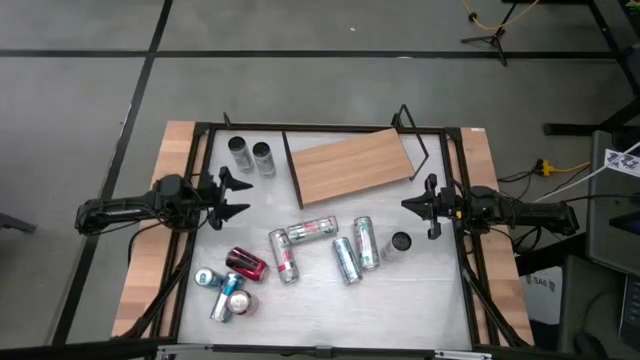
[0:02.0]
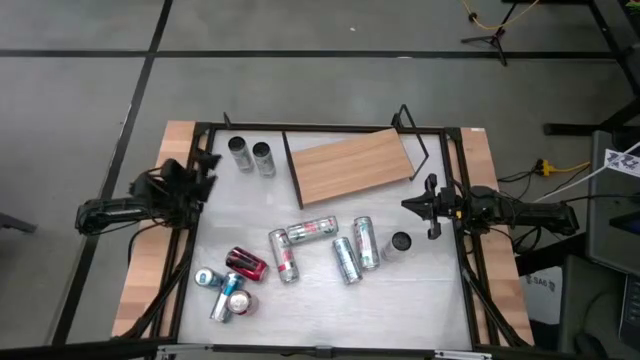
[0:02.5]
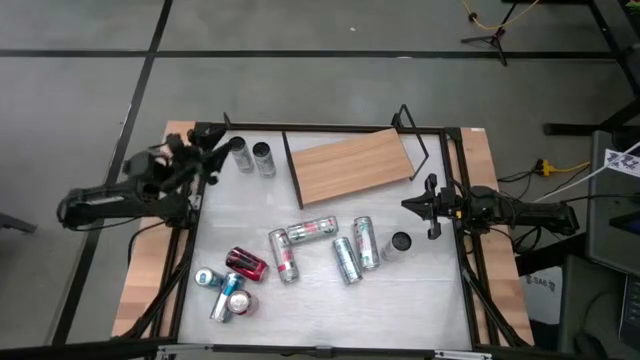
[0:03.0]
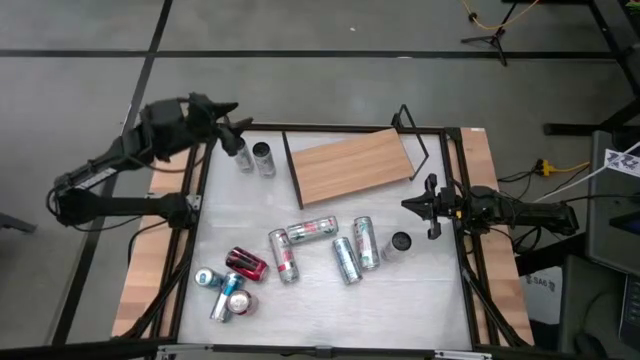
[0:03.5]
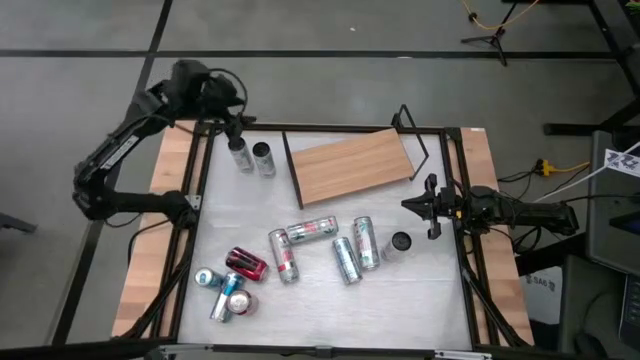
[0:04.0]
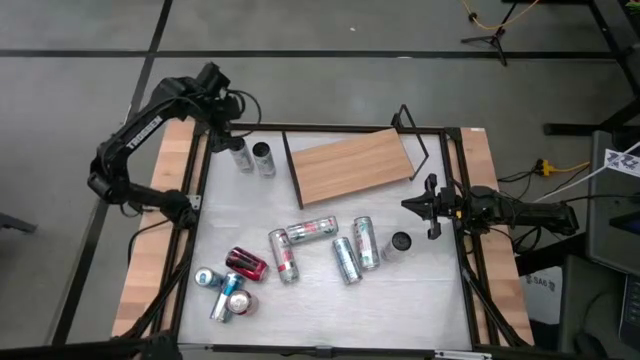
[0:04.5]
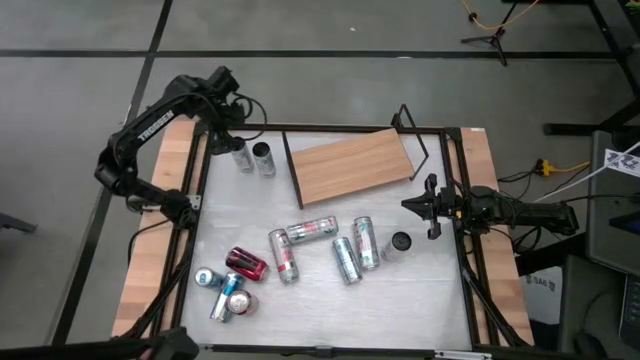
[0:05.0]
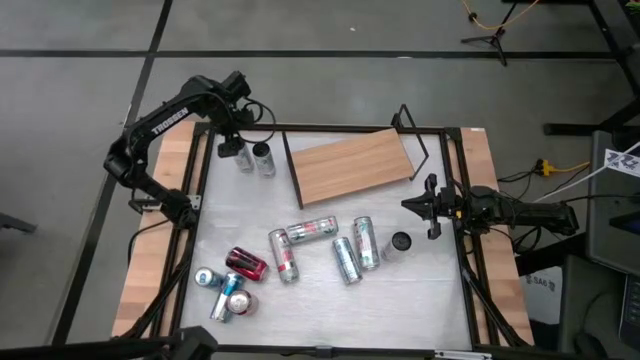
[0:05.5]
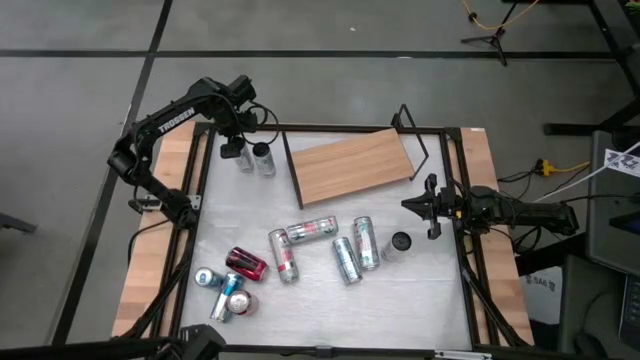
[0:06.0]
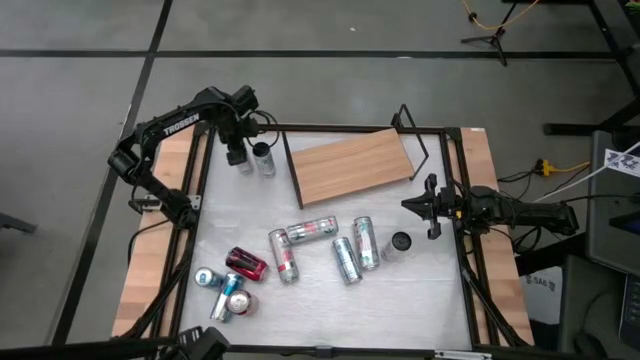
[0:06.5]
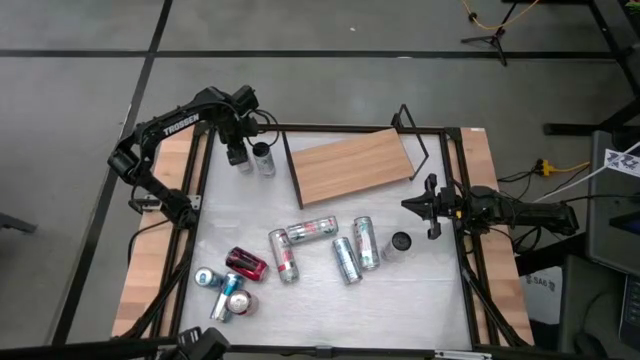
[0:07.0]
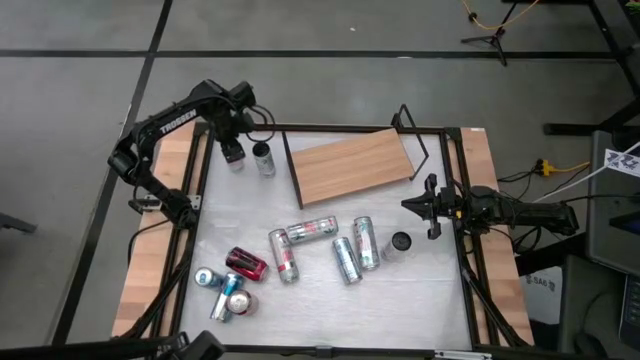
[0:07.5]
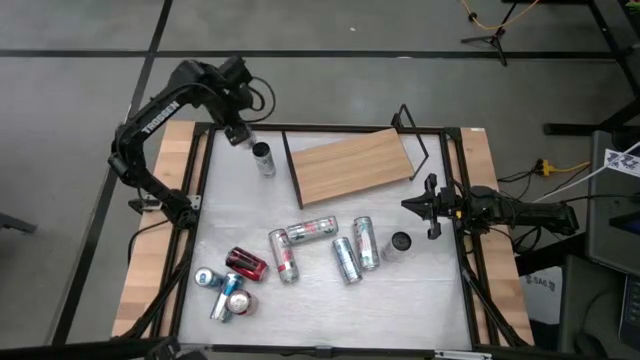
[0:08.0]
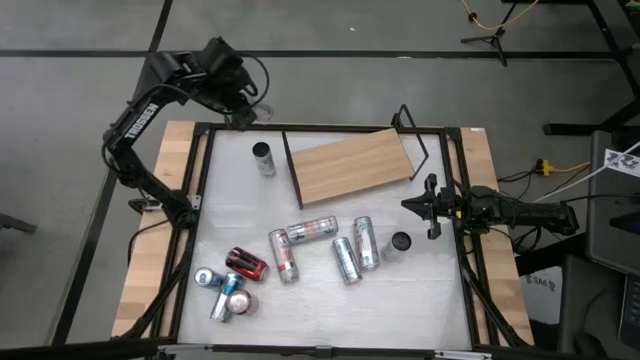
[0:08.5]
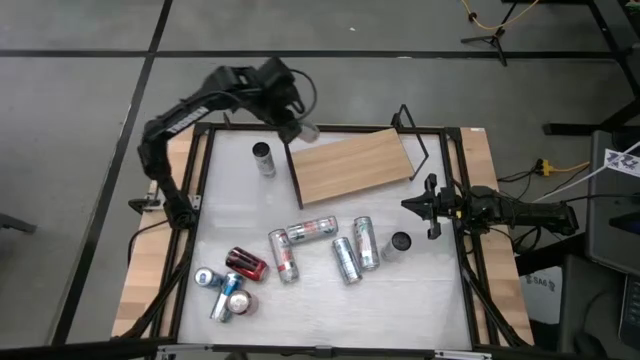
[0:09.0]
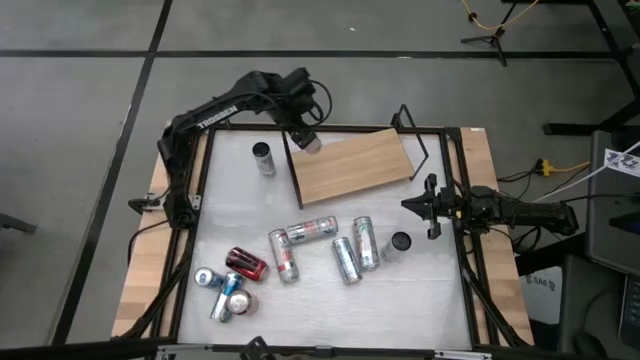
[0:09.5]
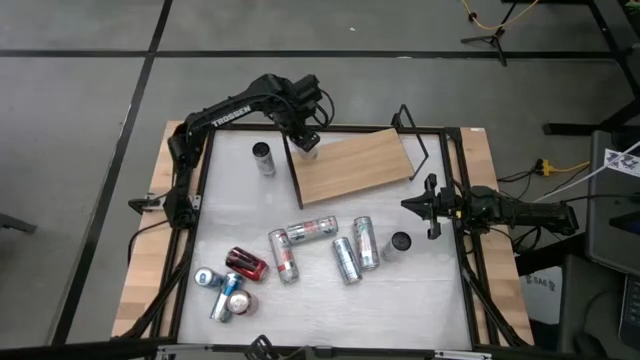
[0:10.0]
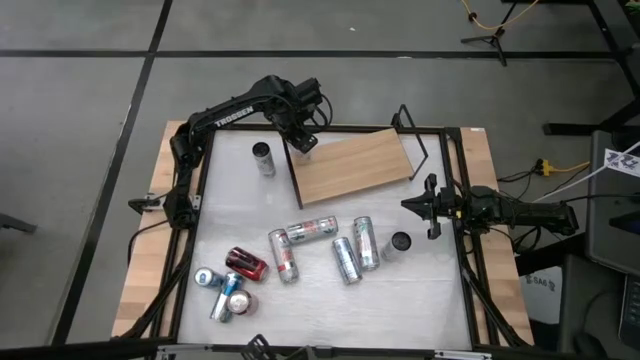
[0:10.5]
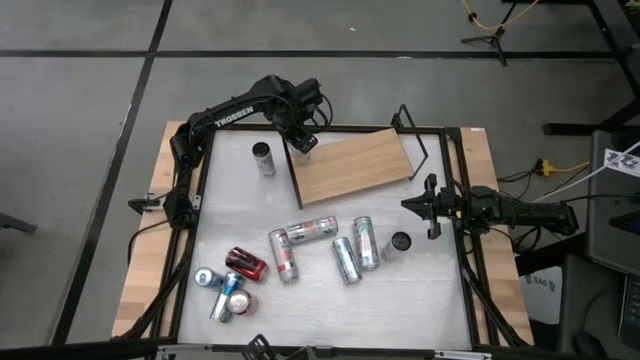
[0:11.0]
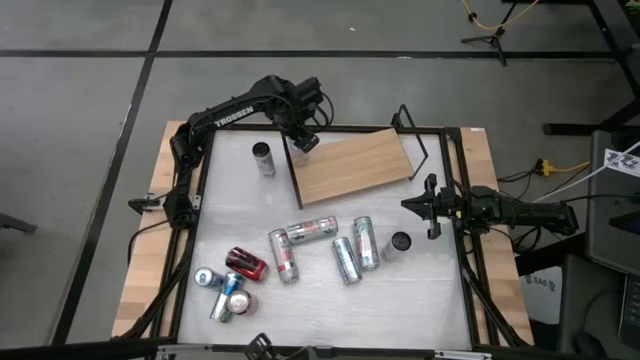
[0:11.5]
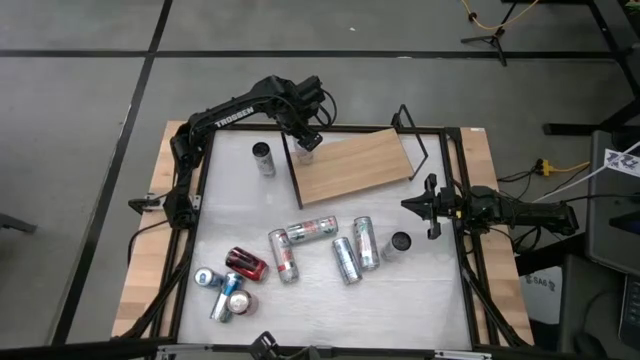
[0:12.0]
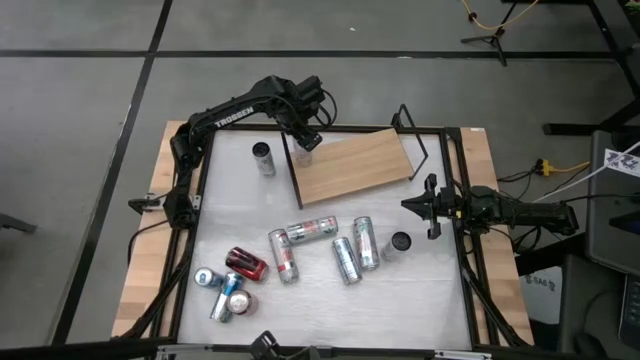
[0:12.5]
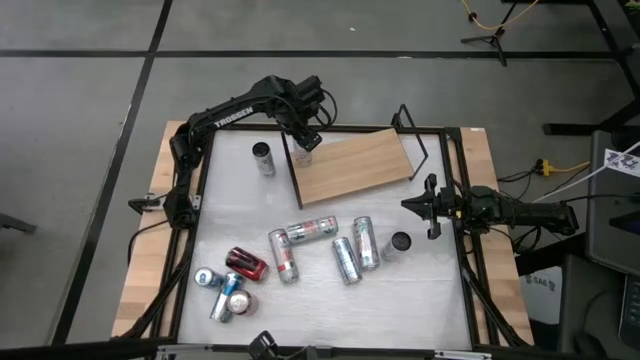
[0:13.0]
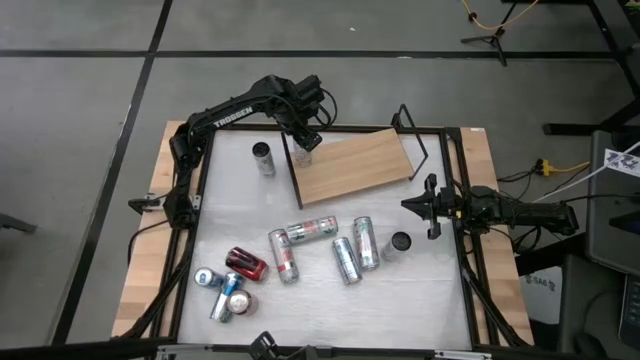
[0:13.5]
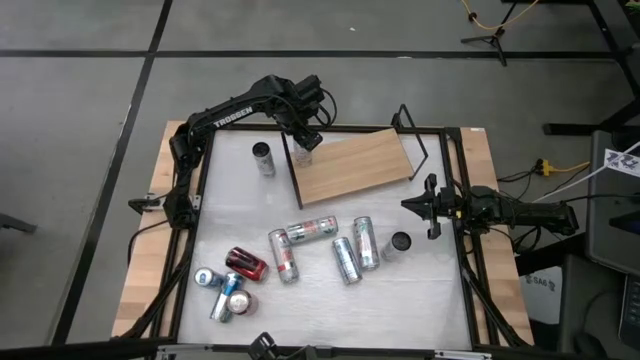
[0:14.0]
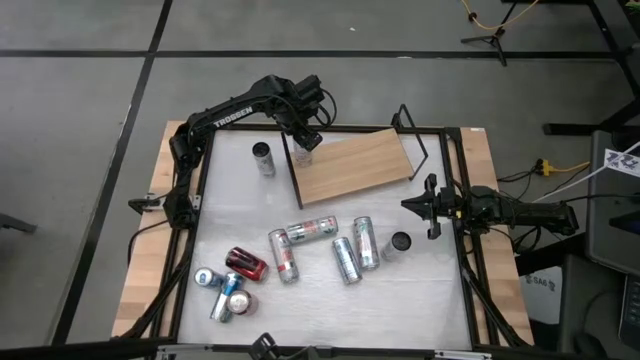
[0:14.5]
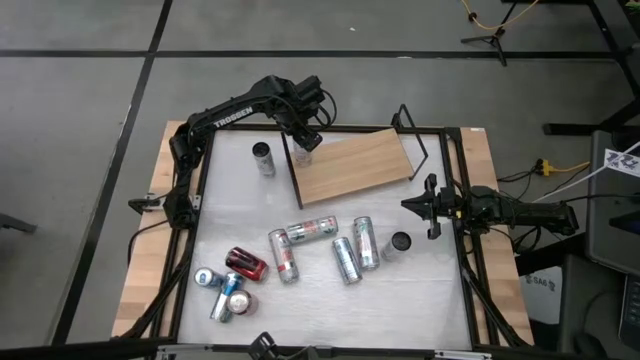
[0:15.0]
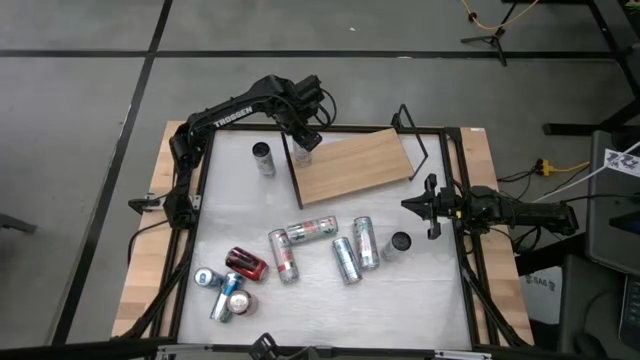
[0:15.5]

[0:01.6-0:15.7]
Task: Place canned beverage on shelf
Put the white pink soda can on the shelf
